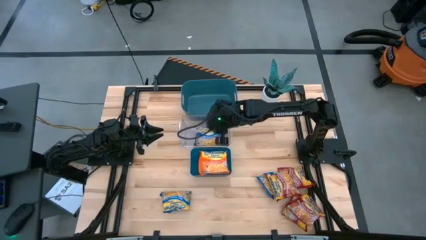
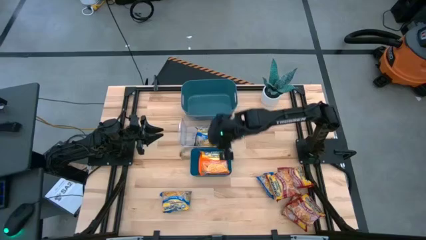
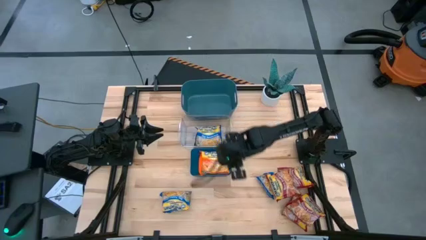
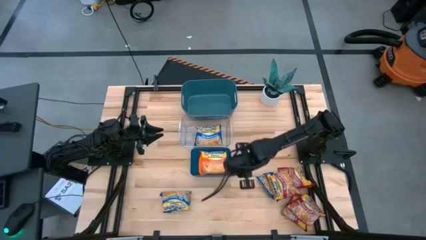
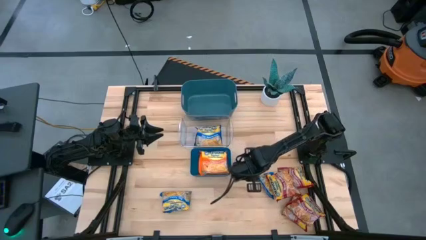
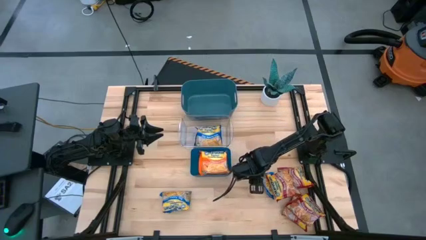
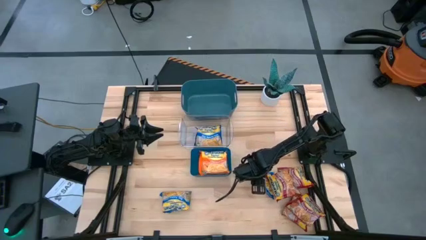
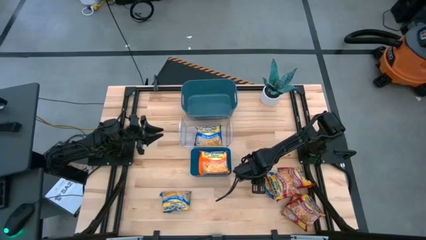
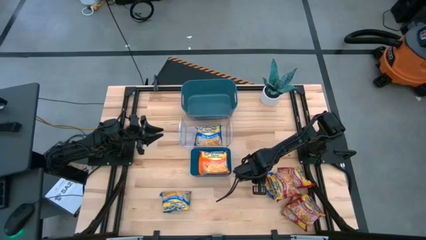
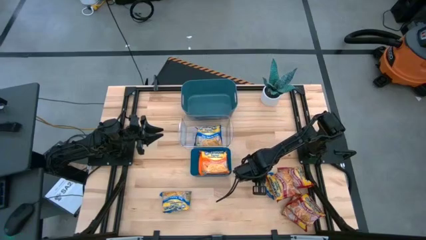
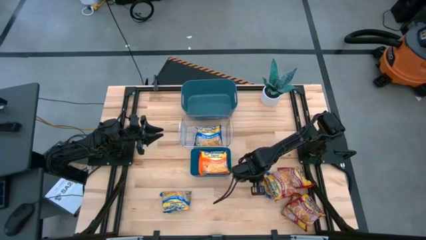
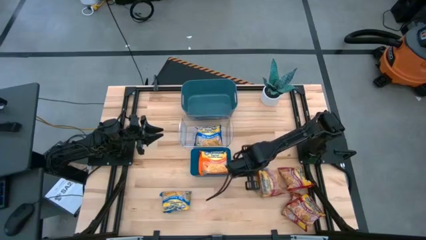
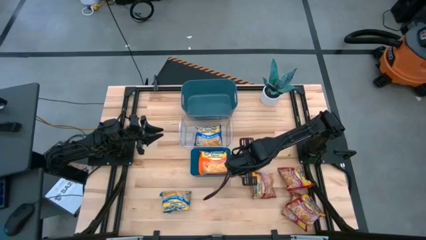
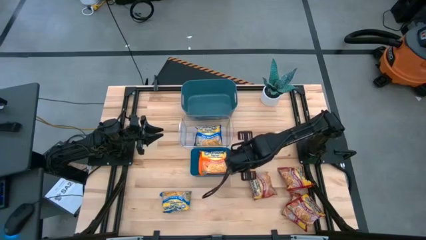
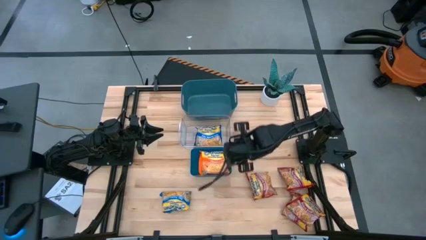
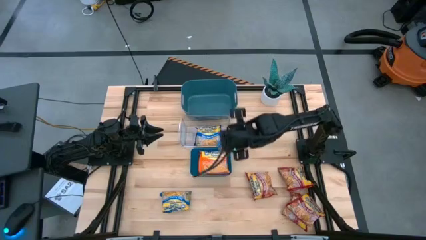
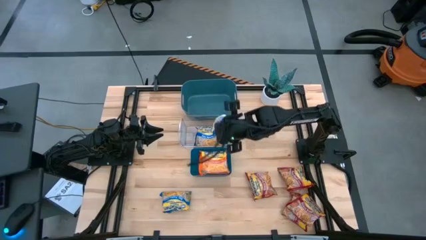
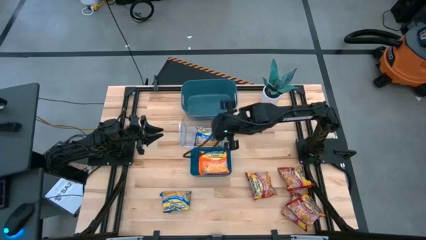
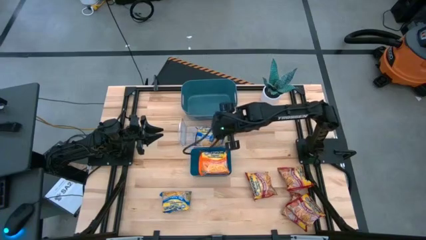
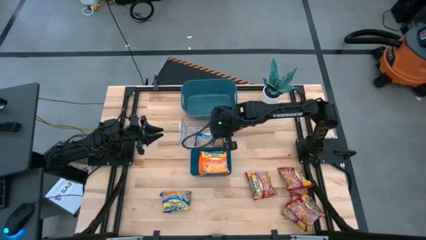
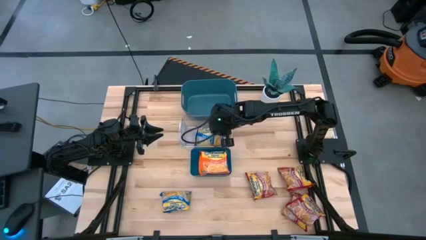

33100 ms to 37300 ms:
Task: Sort Maruchan noodles
Put the blue noodle pack into the transparent bin

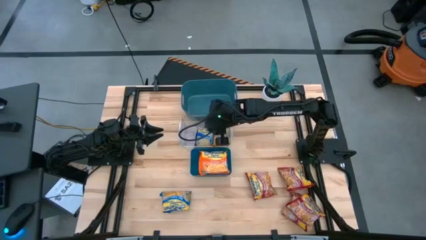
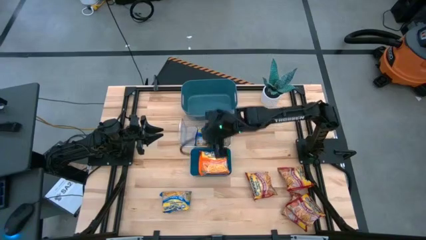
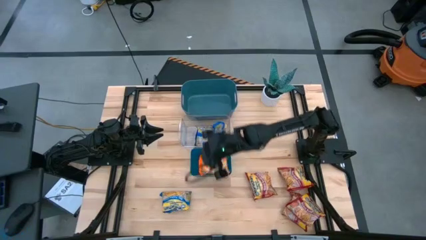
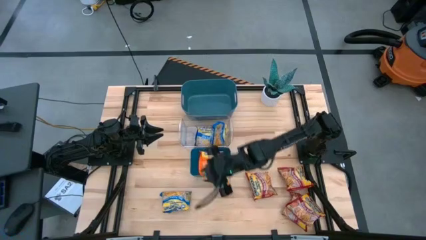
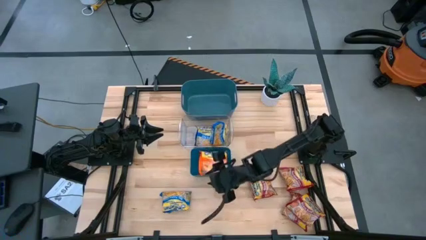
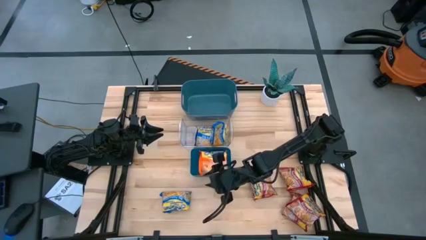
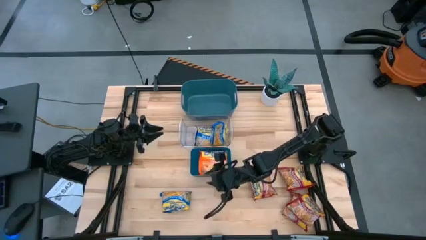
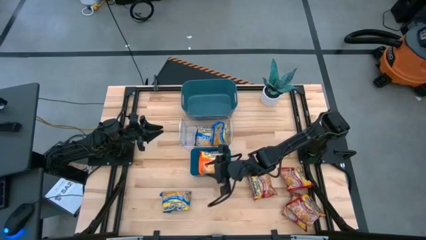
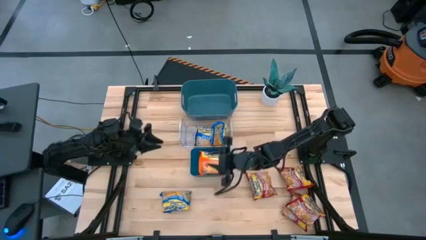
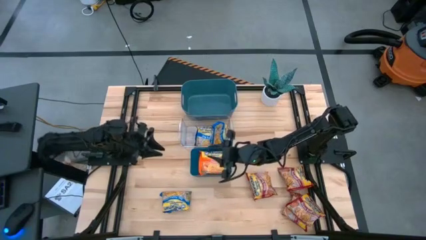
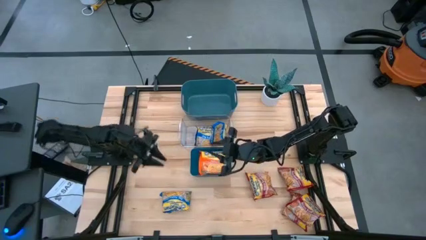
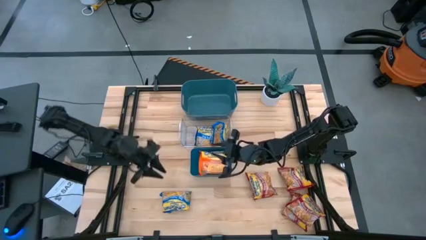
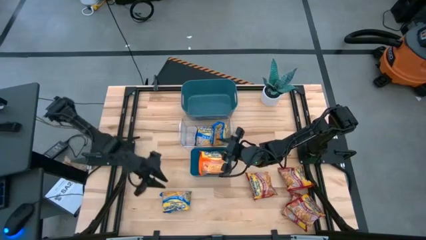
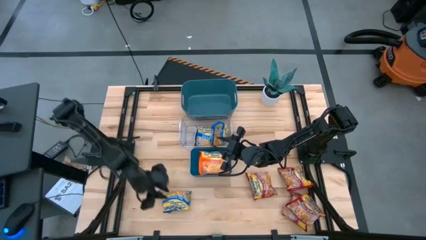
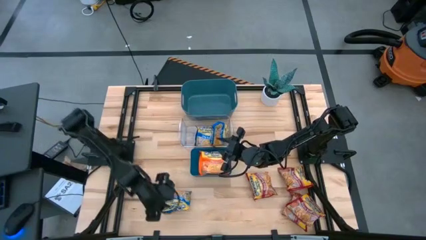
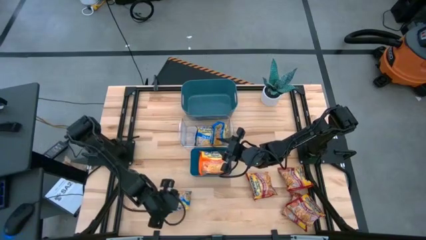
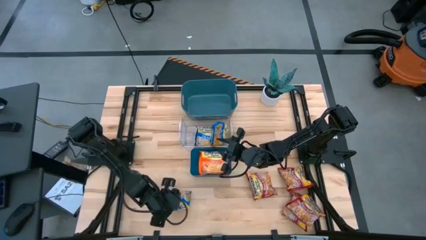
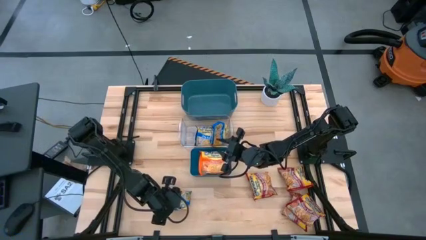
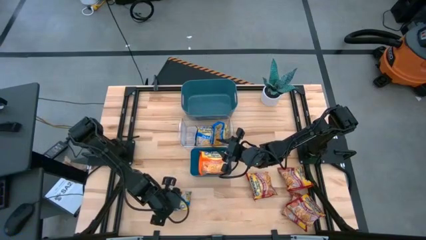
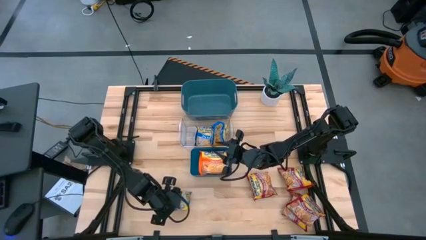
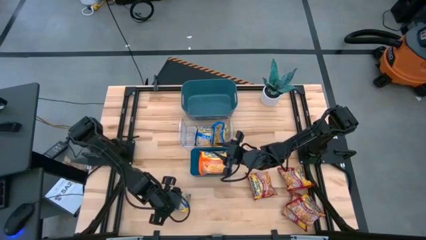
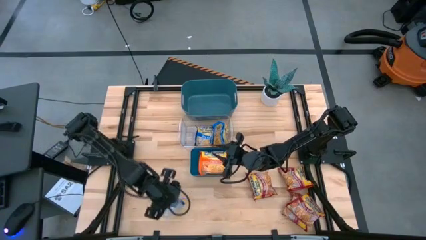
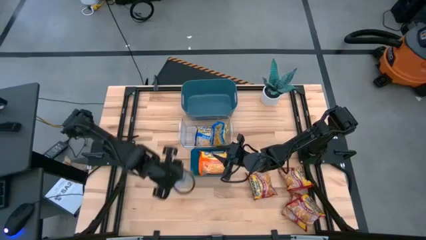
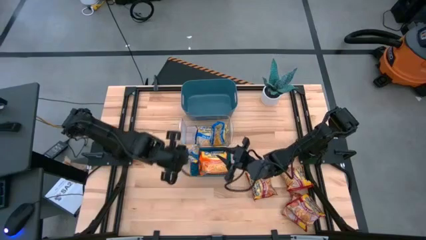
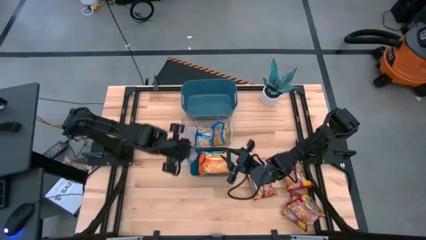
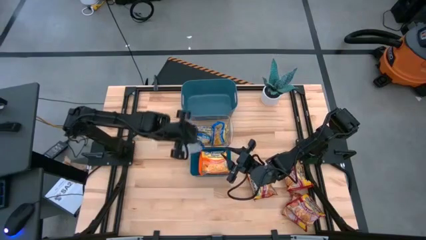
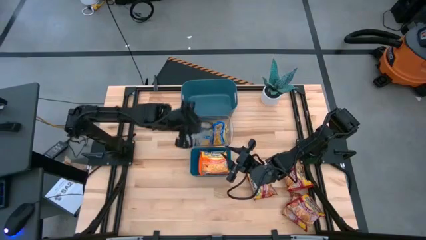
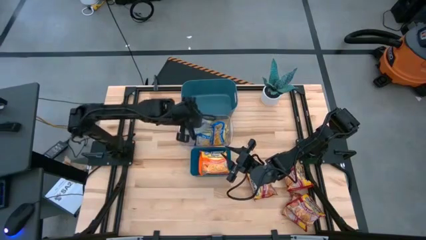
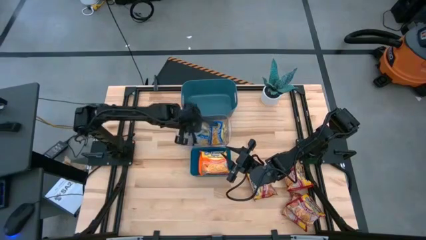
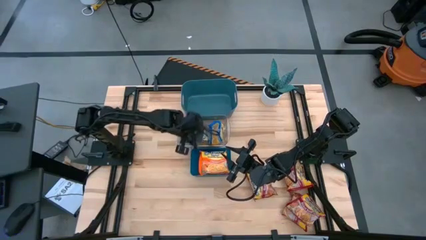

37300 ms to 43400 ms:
Put the blue noodle pack into the transparent bin

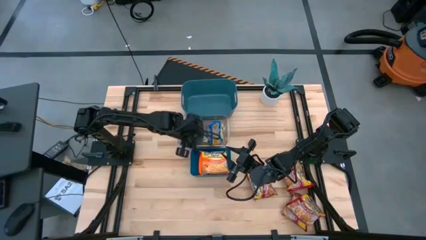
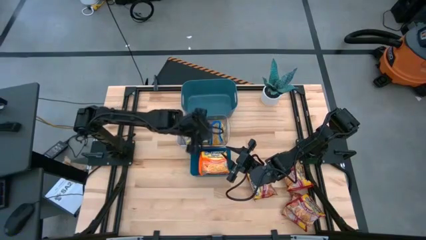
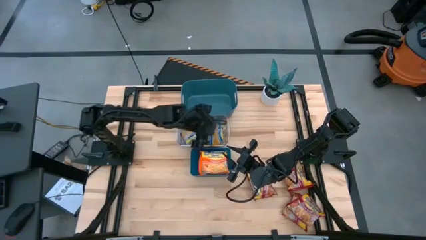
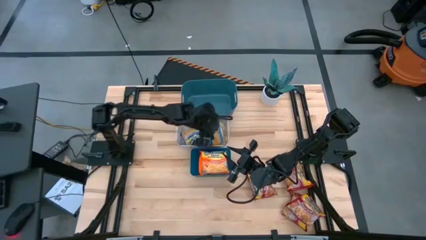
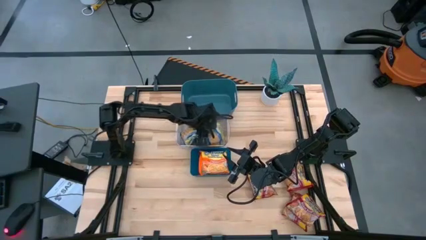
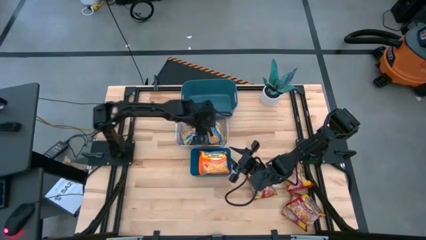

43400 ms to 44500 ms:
Adjust the blue noodle pack in the transparent bin

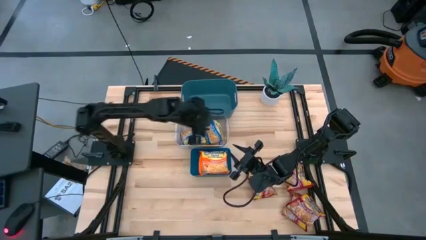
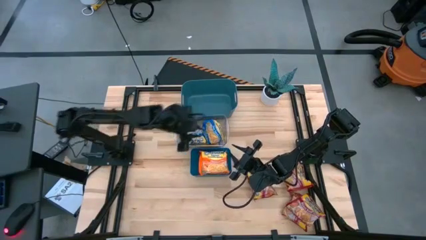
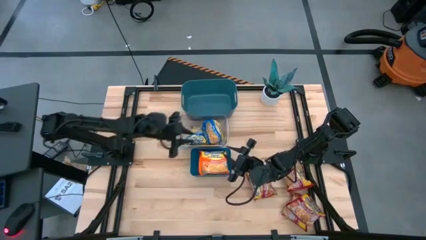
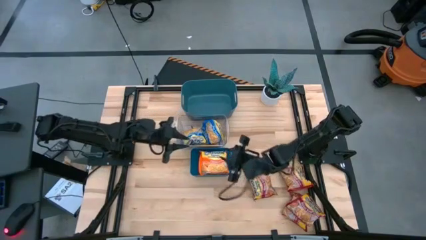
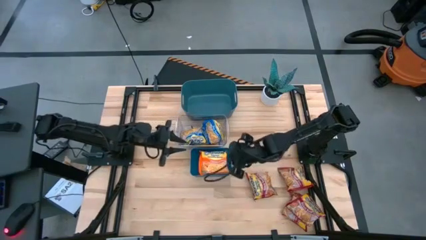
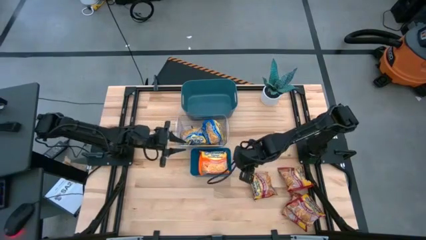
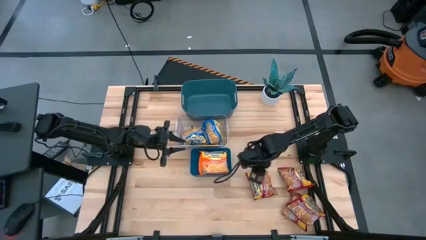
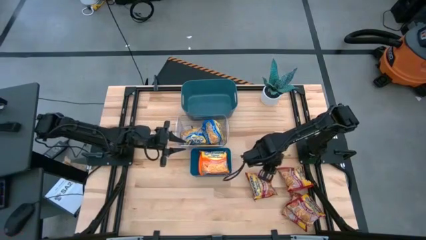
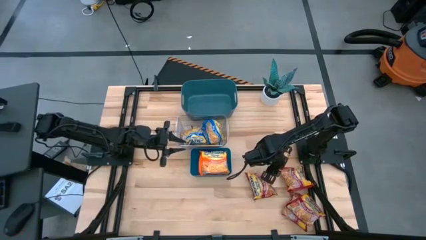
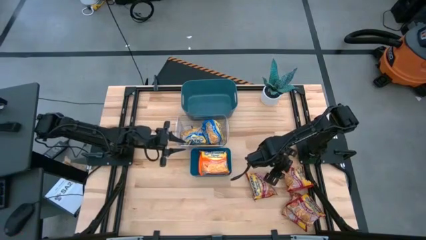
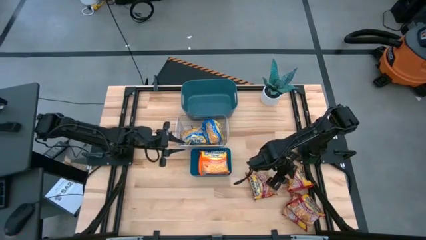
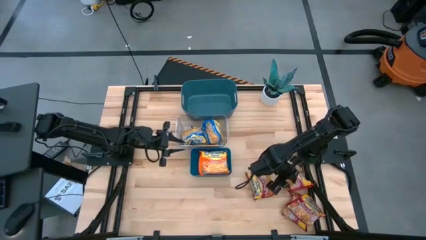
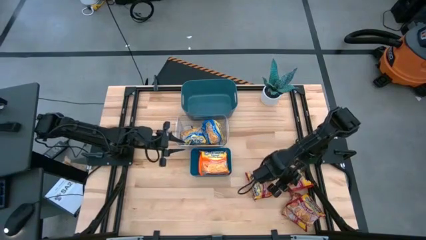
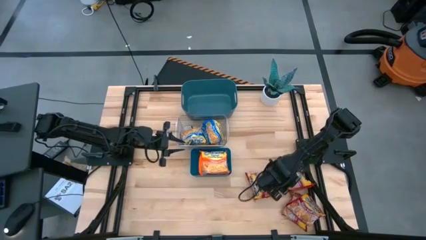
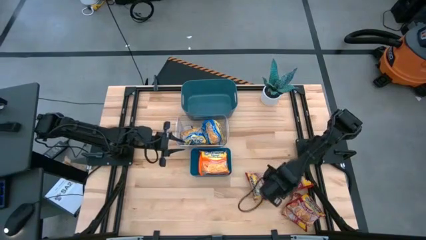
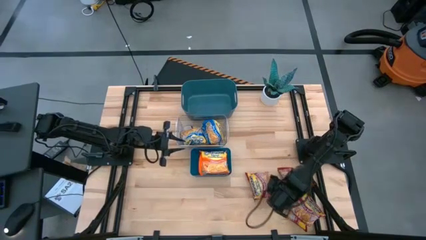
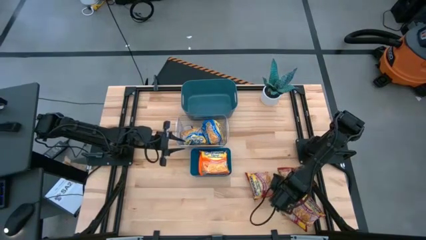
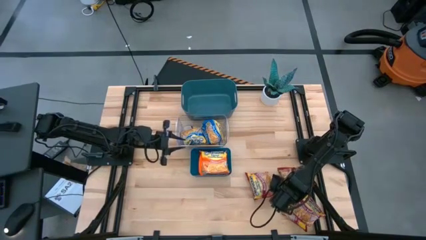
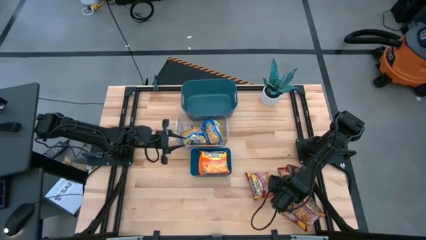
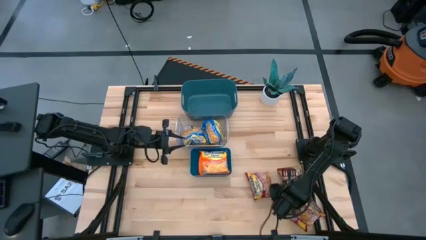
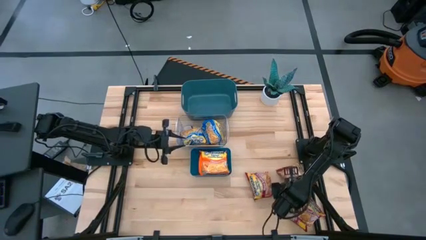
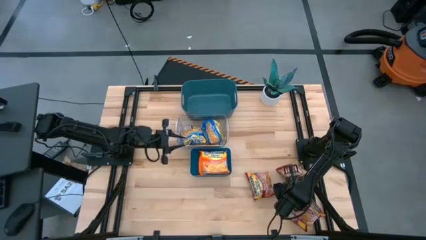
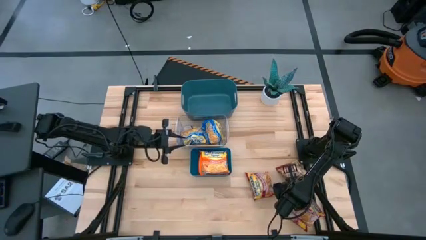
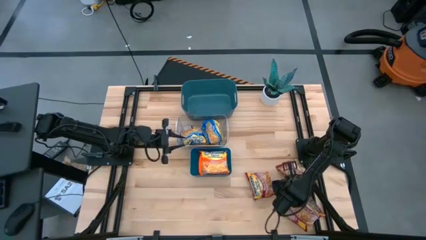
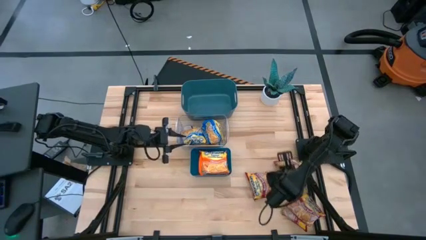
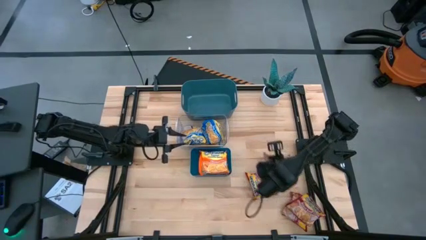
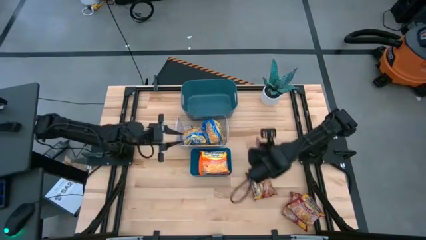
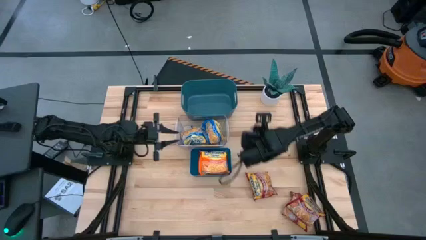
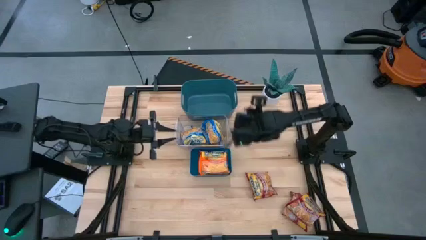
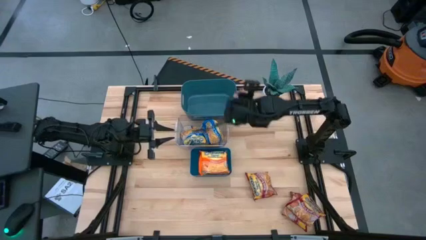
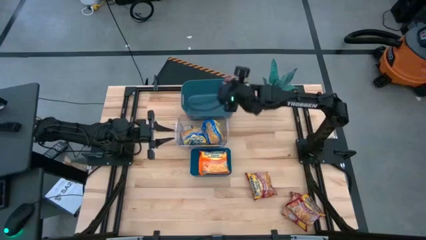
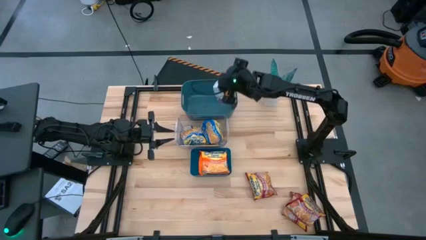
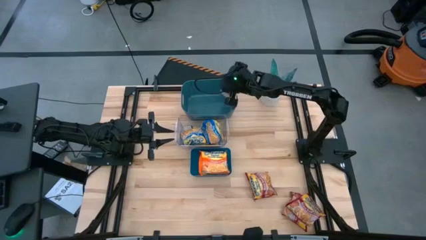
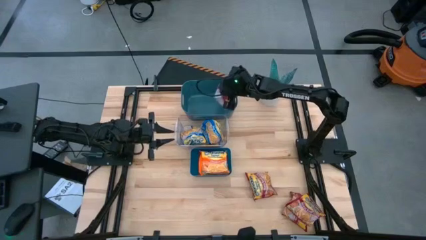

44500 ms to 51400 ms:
Put the red noodle pack into the top blue bin
